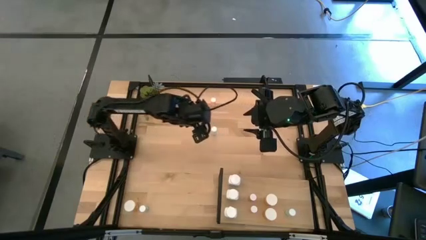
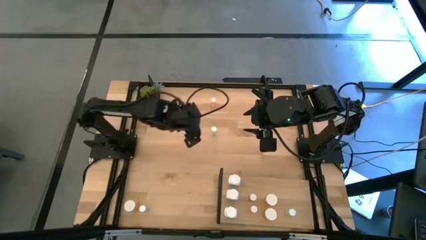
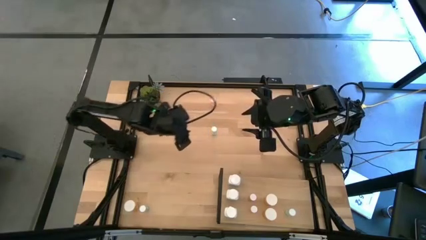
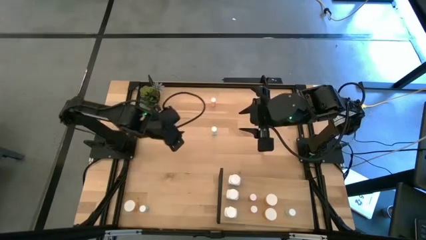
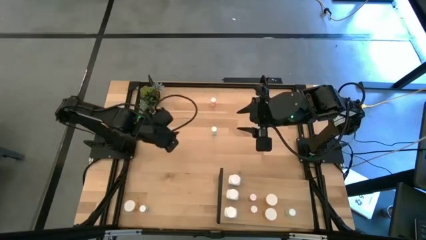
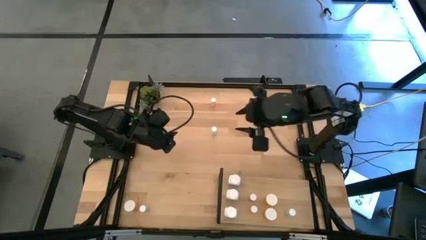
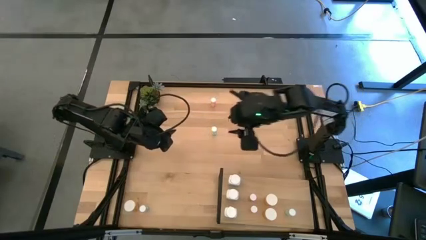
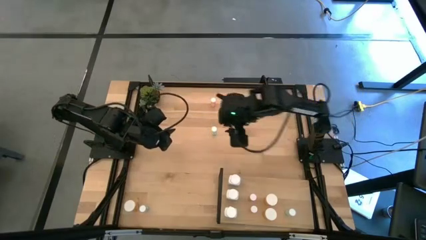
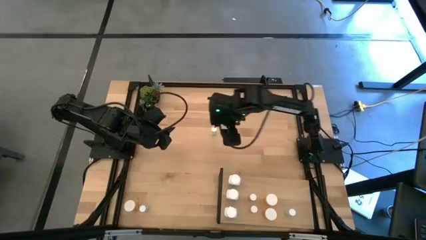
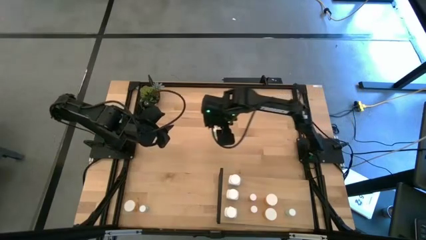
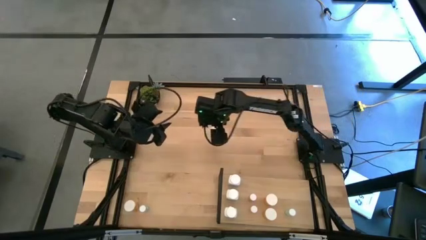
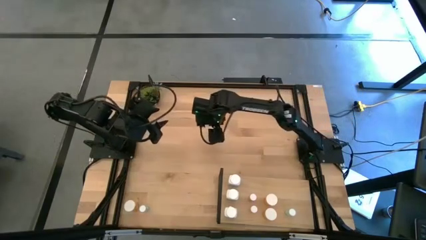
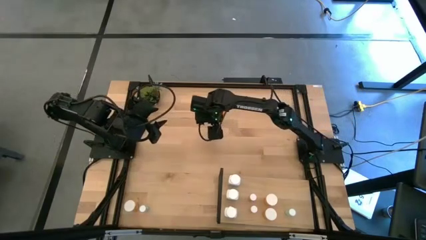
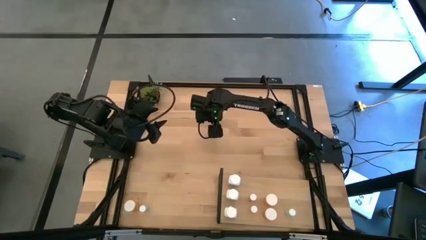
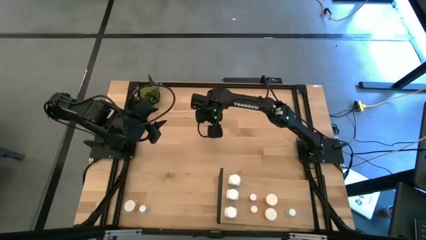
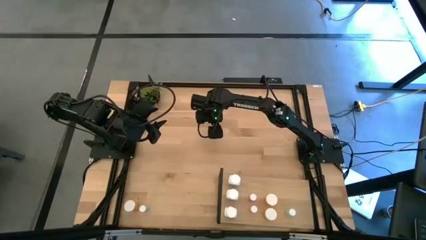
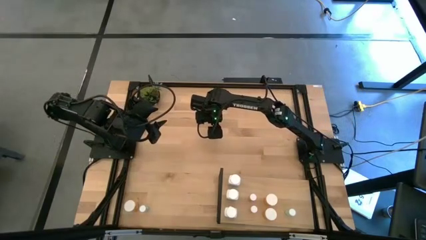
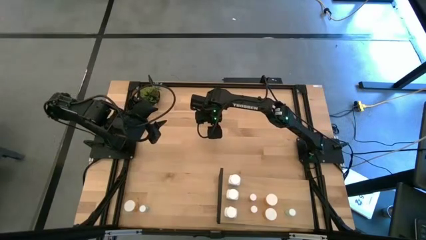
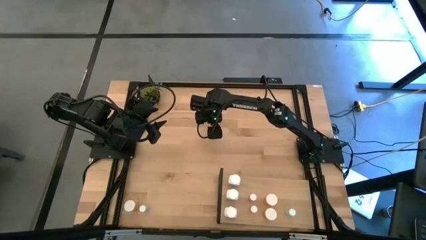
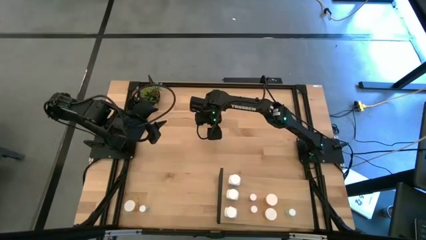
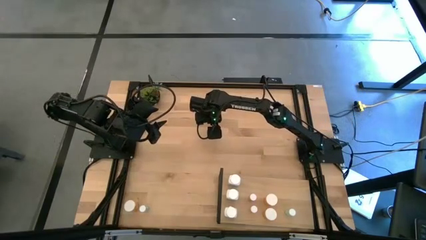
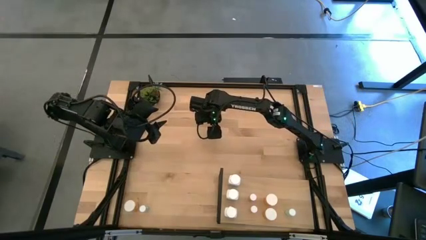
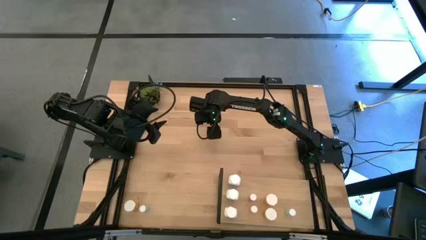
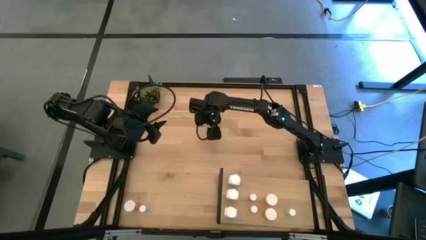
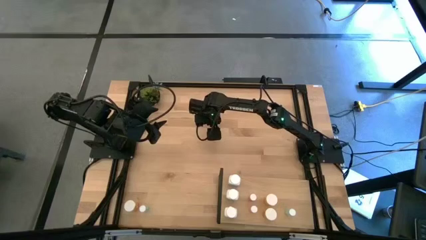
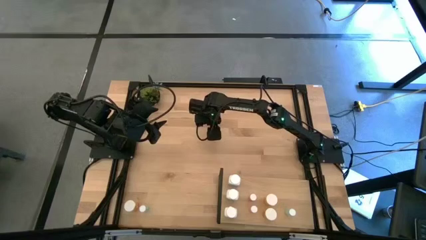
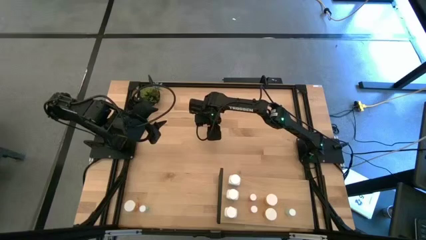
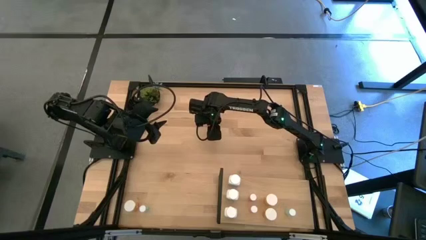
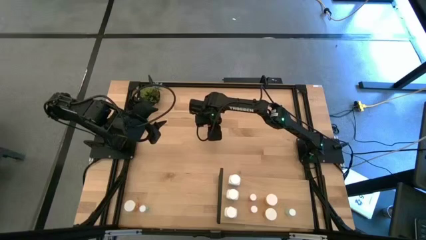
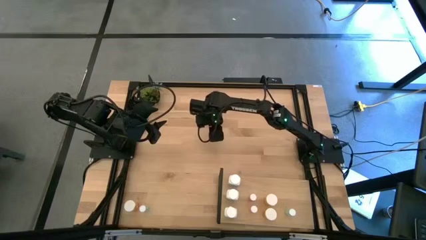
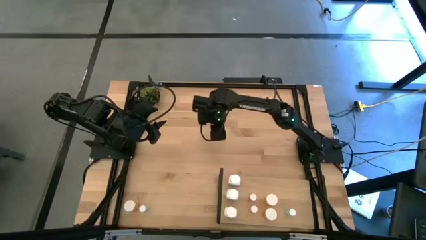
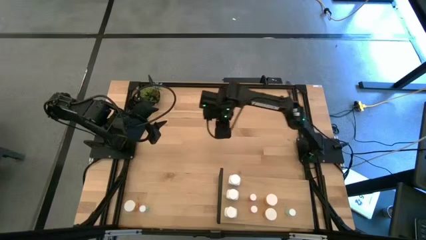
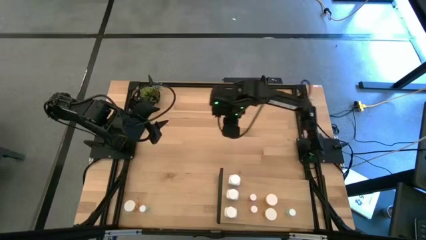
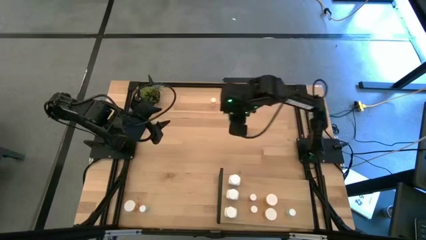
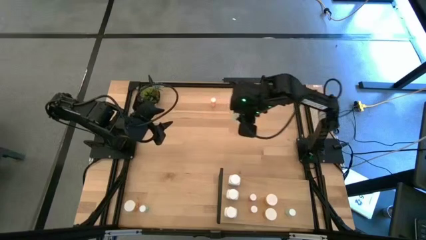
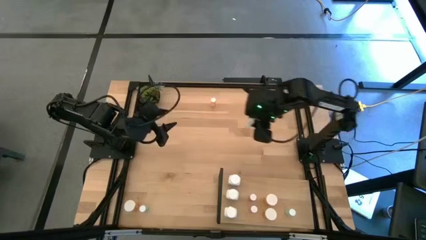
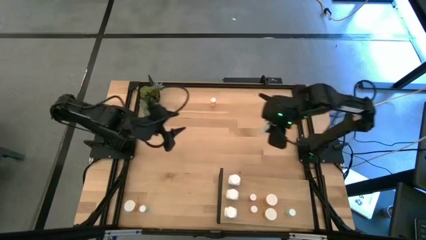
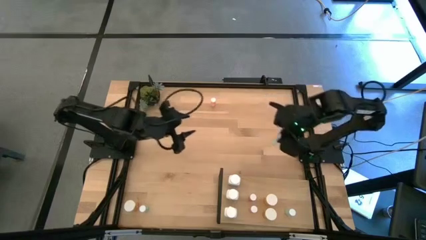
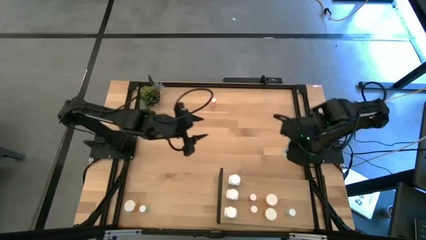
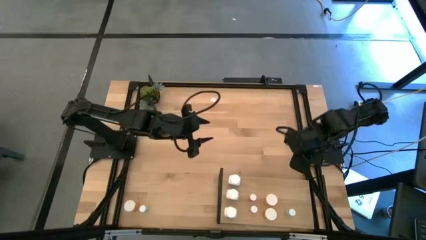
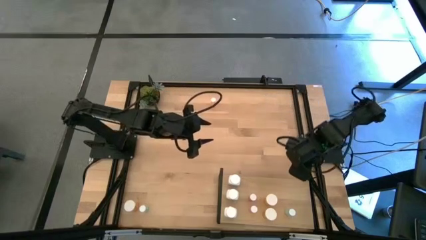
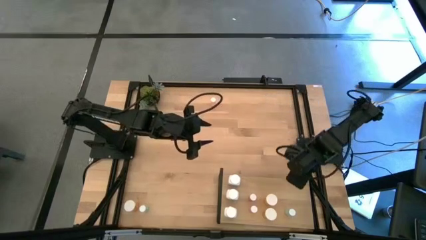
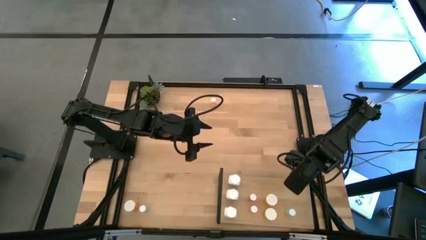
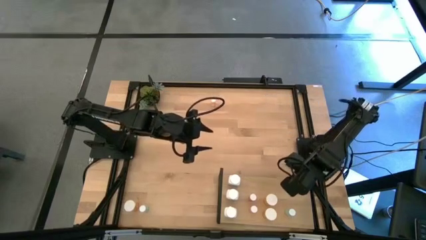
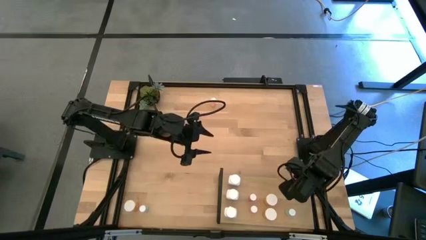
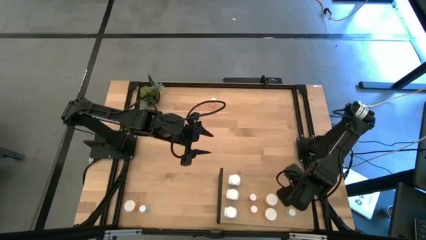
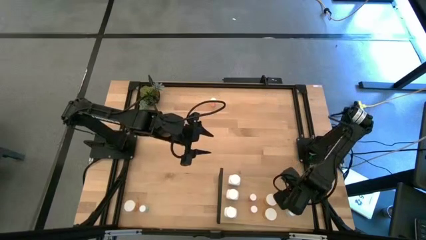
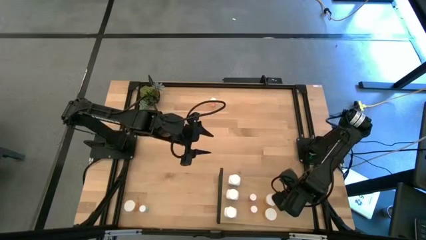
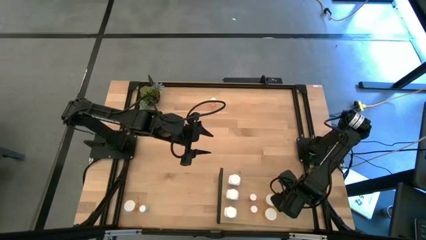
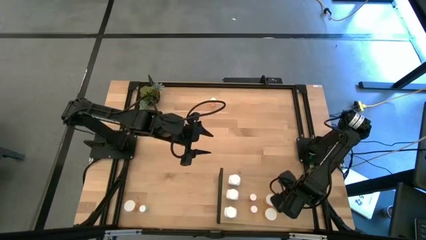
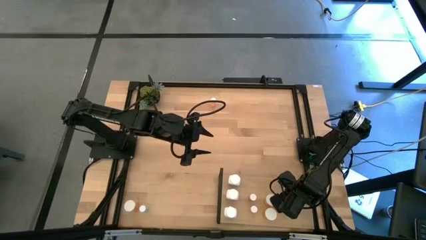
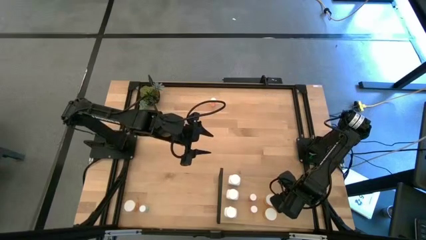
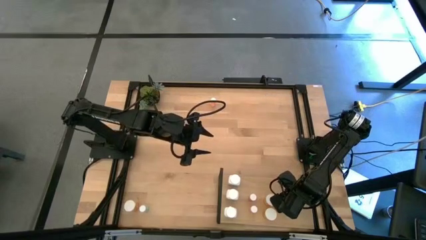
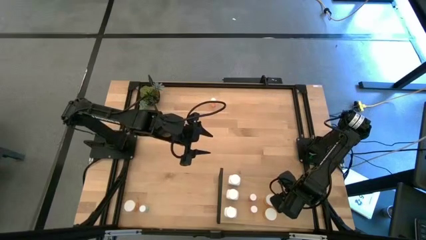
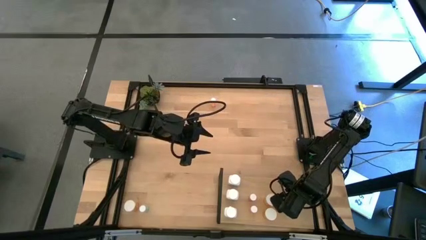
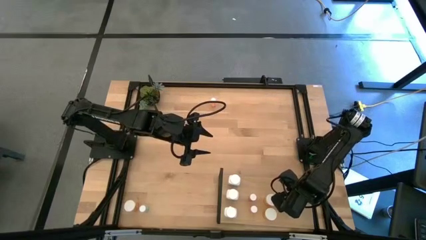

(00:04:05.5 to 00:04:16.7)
Task: Pick and place medicine bottles onto shelf by color
Put the middle left blue pill bottle on the shelf
